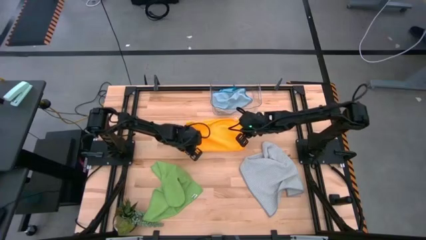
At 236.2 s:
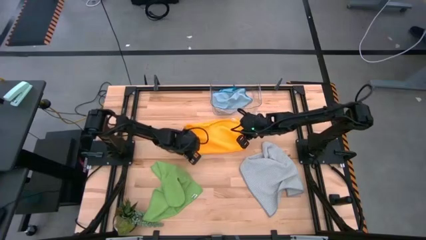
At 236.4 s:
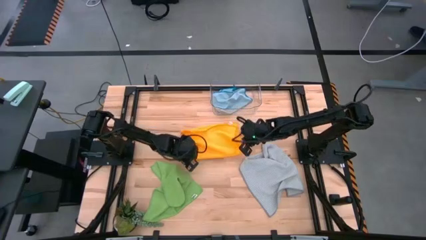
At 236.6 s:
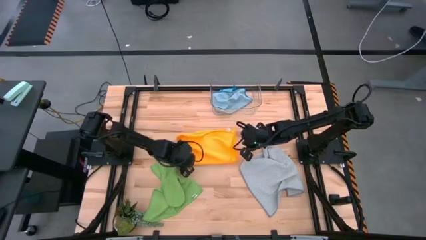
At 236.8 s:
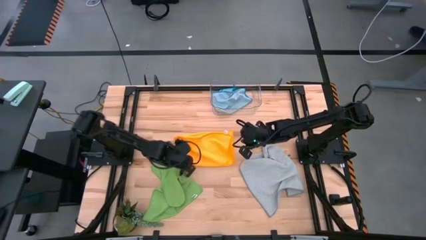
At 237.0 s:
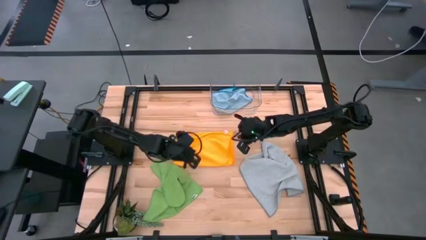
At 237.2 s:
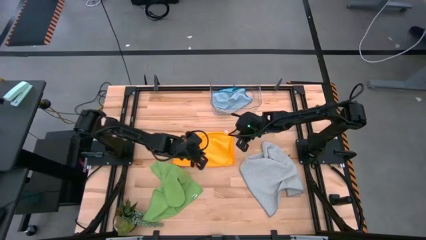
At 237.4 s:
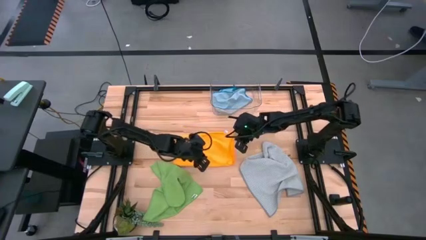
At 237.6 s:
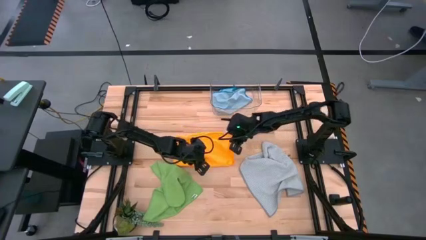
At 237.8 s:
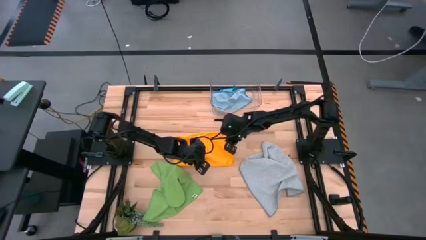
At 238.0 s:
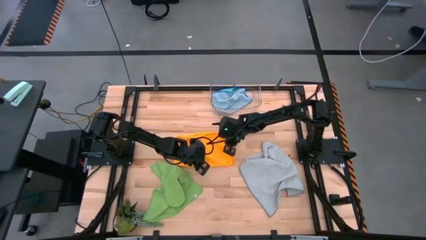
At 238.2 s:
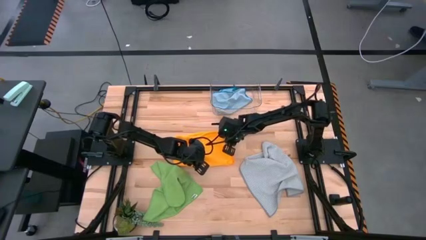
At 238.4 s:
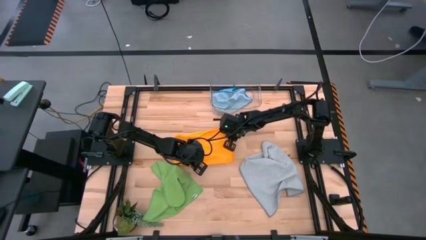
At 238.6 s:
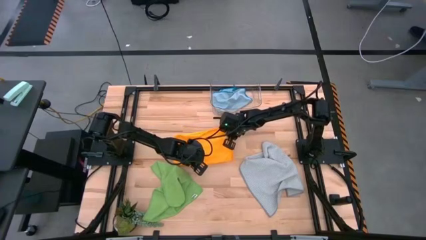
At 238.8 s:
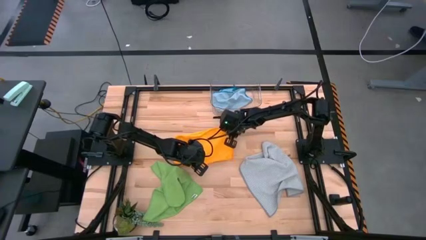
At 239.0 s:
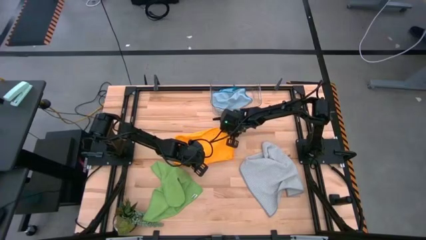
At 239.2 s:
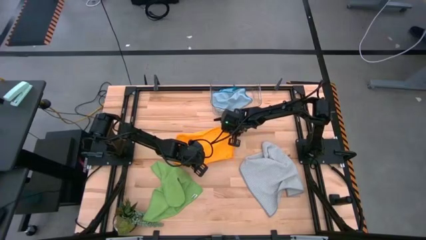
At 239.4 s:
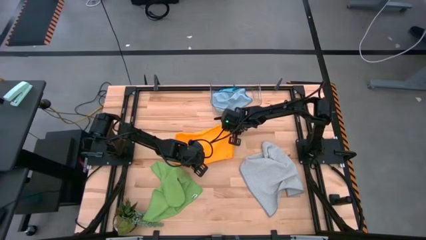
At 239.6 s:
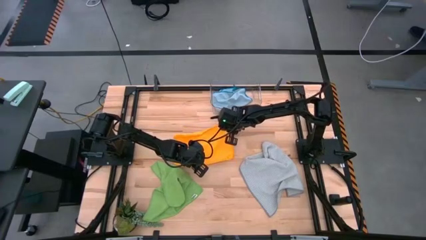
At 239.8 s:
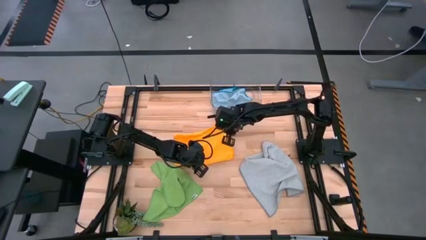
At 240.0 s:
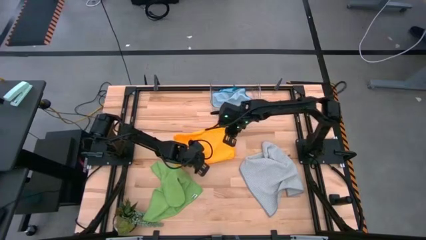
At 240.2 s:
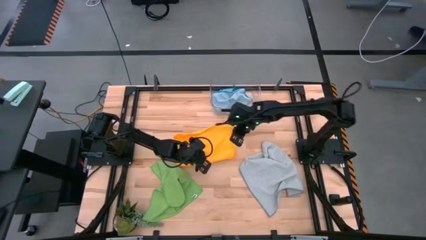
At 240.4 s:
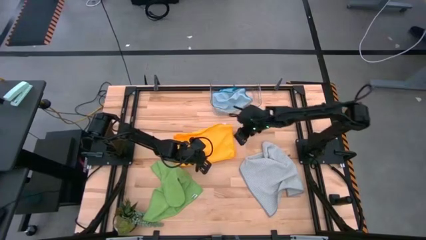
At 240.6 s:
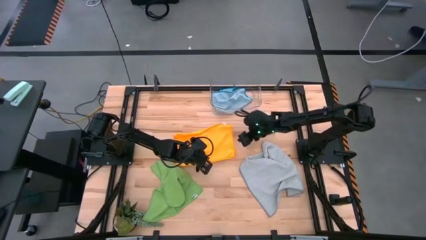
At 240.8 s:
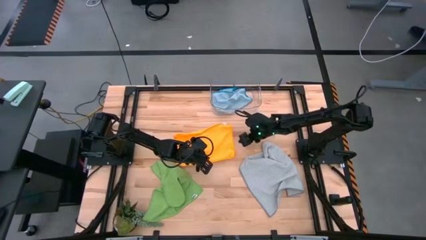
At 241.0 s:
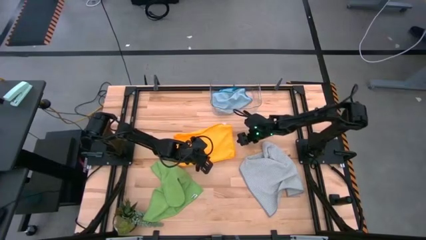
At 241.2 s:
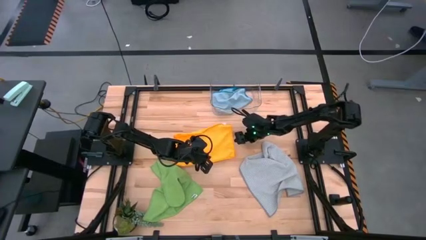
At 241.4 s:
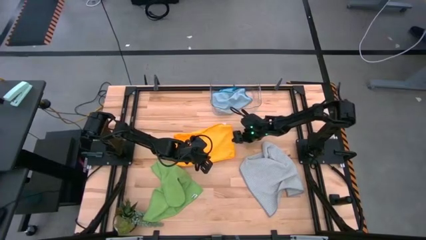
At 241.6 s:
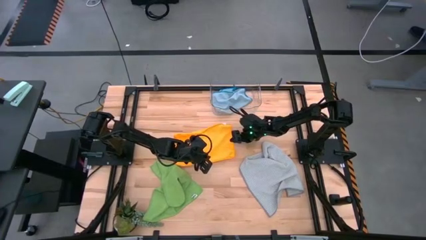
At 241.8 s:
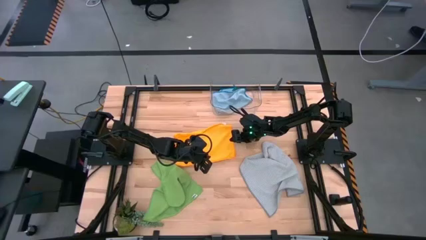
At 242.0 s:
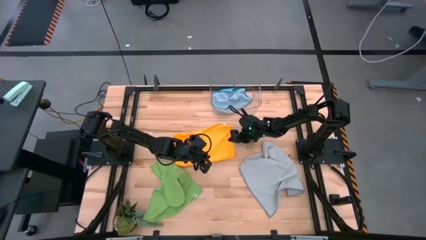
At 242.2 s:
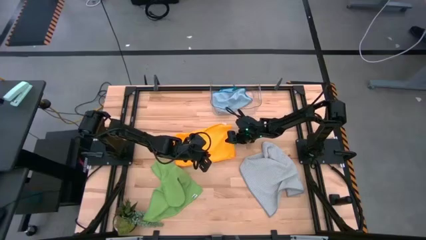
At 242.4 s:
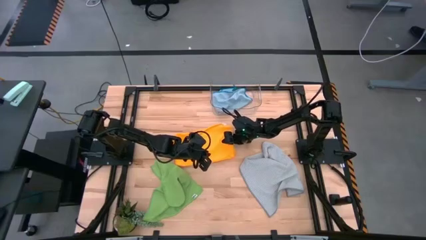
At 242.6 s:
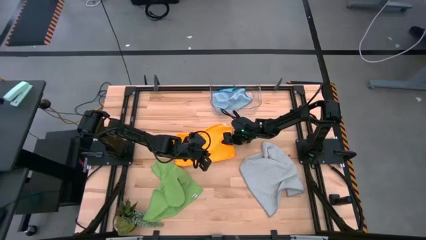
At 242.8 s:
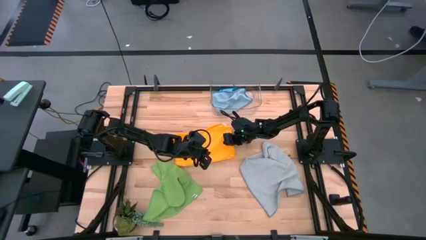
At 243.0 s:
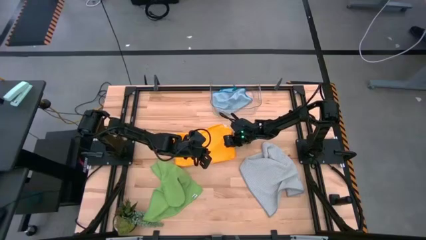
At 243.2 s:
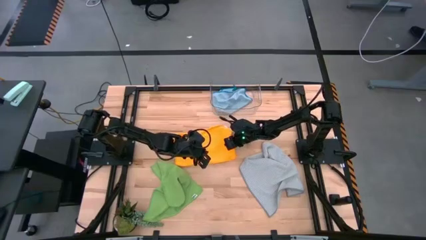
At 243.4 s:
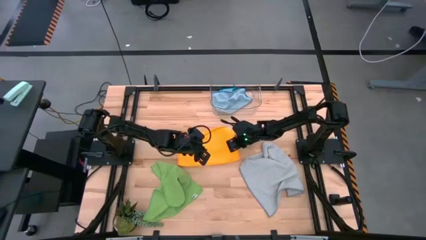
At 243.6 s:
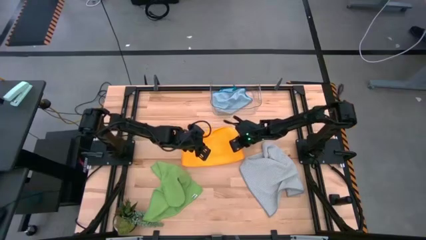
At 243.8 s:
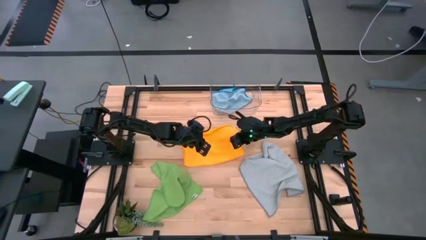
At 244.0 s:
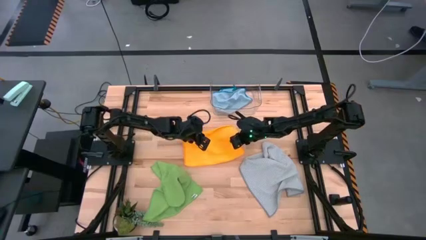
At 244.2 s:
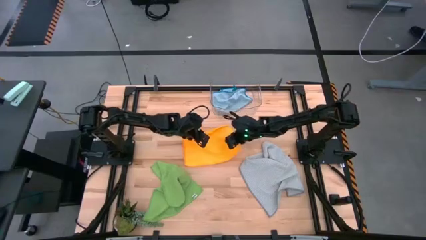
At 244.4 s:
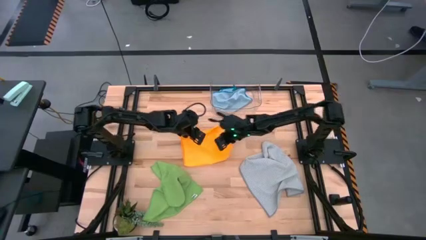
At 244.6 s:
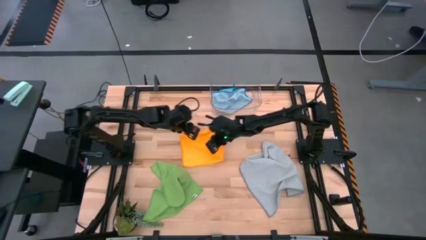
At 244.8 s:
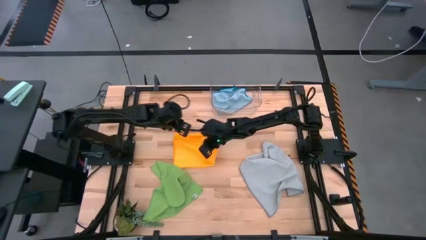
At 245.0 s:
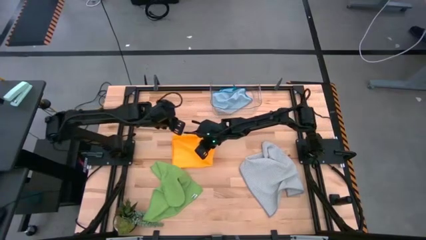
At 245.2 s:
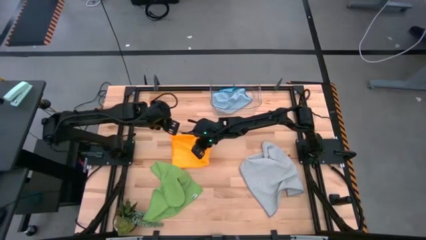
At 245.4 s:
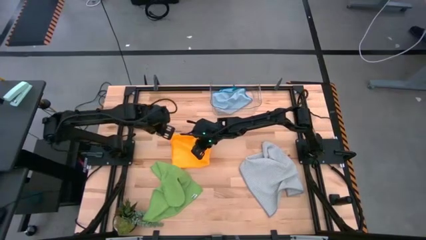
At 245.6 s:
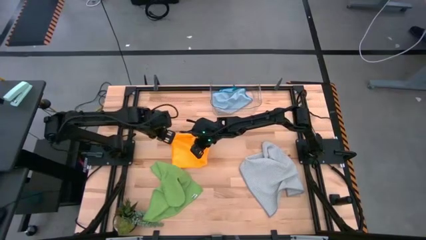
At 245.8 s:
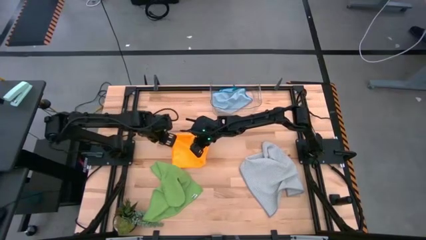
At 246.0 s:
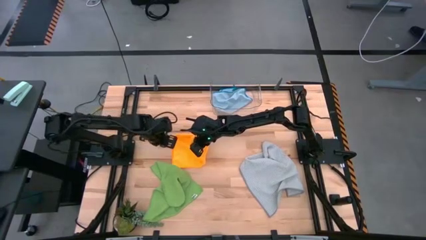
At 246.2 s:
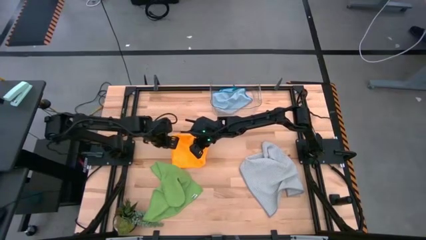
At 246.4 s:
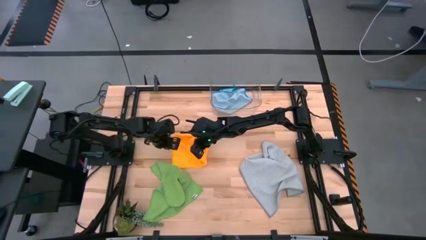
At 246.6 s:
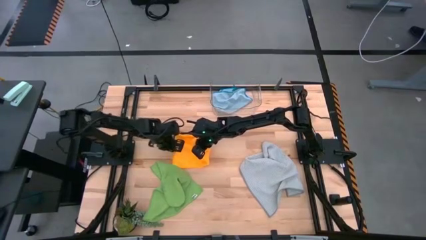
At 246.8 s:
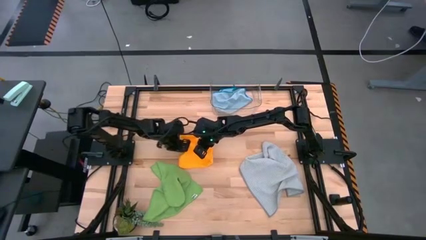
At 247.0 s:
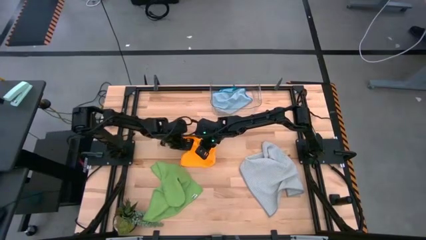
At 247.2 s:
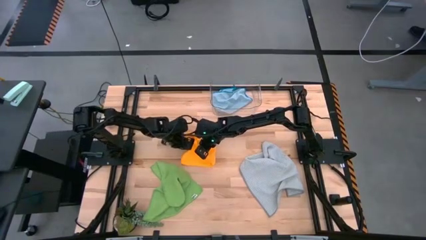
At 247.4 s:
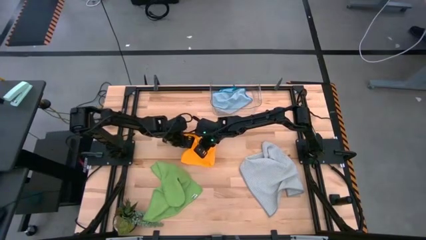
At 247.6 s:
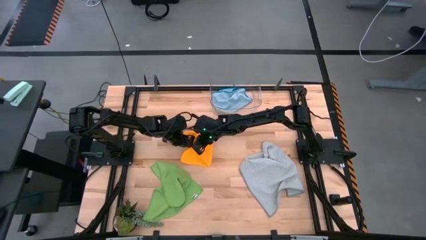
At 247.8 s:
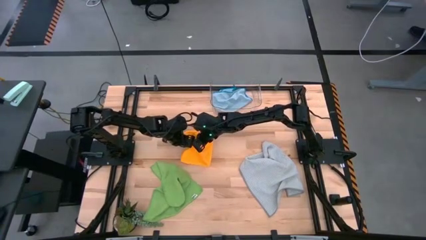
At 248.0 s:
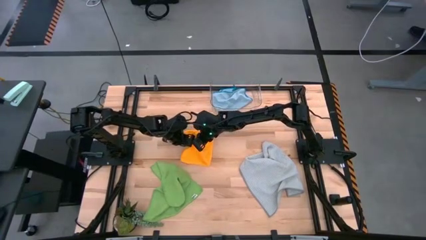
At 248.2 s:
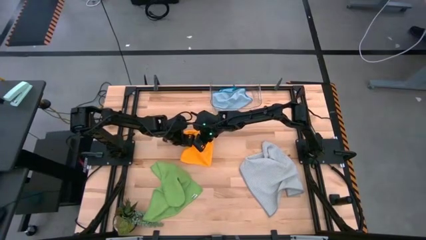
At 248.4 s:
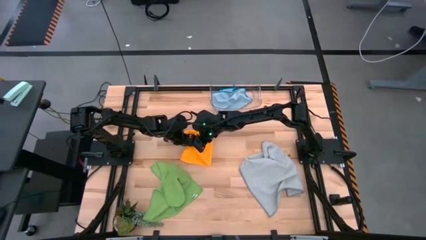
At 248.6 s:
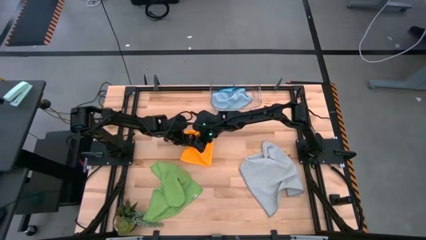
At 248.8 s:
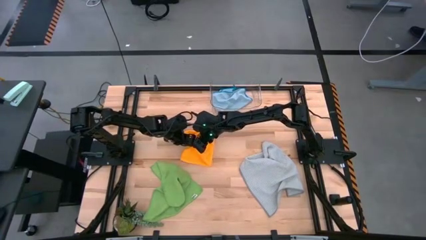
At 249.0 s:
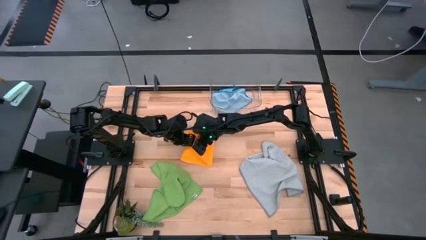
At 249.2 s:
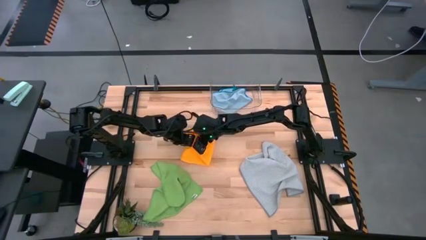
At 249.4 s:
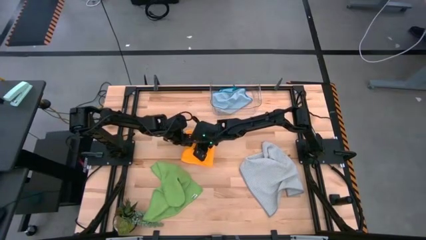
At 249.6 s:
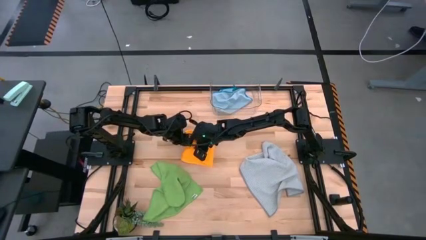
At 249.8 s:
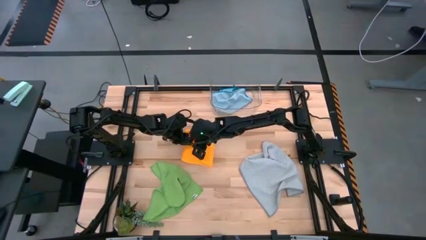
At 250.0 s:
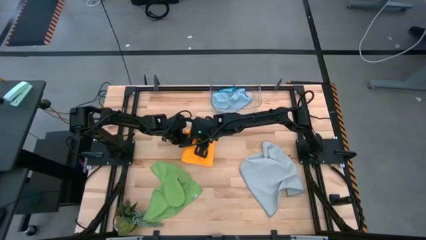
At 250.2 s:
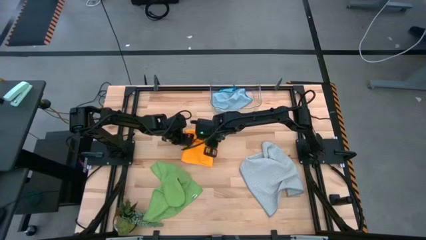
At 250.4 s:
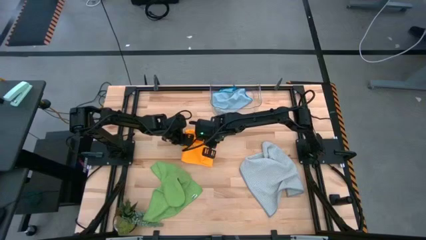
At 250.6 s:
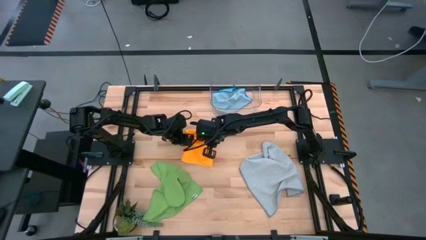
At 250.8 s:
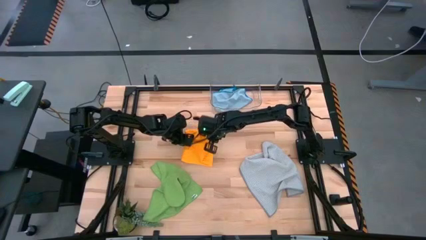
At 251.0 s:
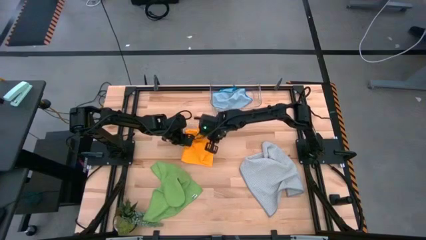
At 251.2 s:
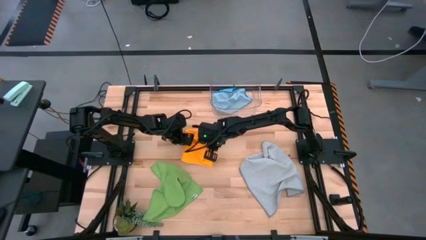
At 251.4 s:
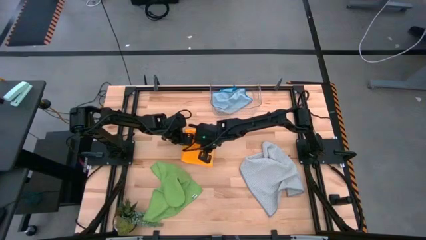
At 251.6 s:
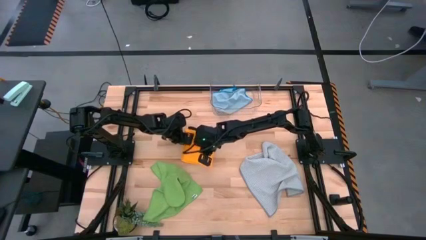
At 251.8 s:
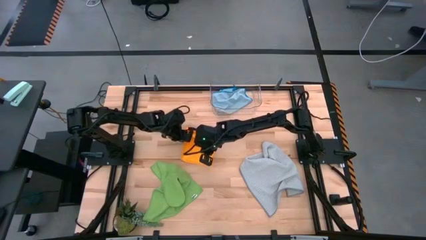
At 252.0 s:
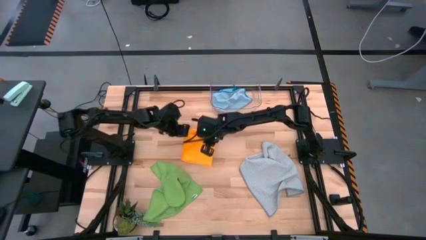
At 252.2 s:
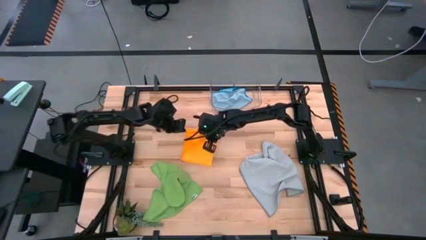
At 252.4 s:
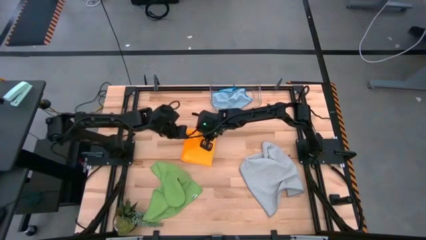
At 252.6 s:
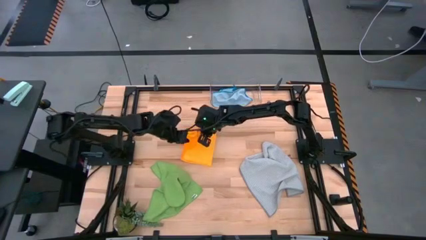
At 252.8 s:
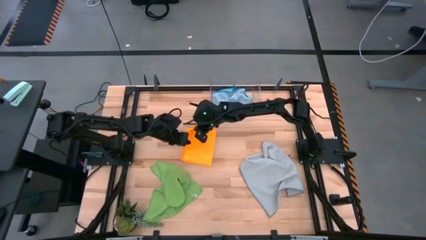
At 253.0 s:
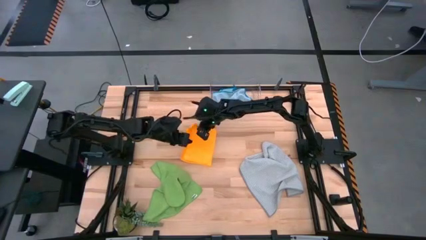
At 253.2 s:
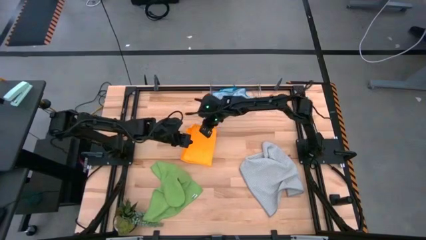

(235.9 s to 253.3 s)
Task: Fold microfiber towels
Fold the orange microfiber cloth
